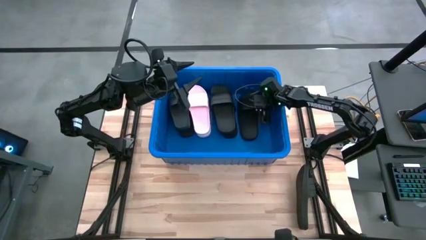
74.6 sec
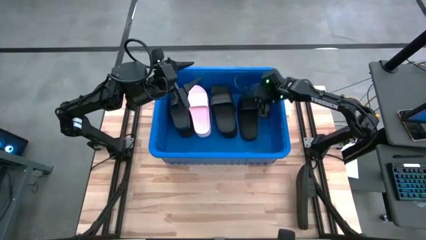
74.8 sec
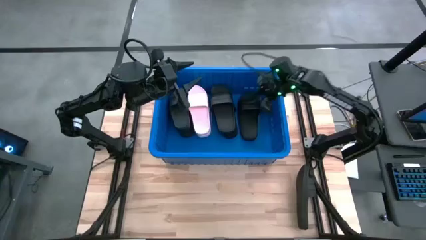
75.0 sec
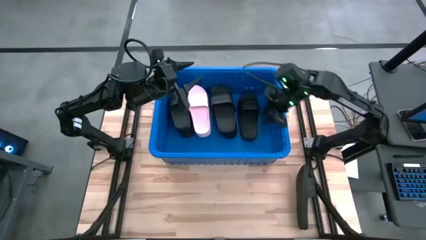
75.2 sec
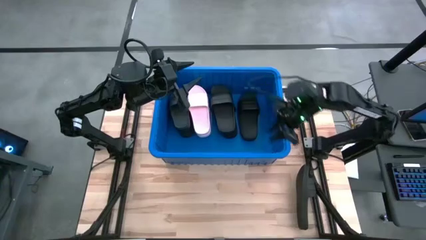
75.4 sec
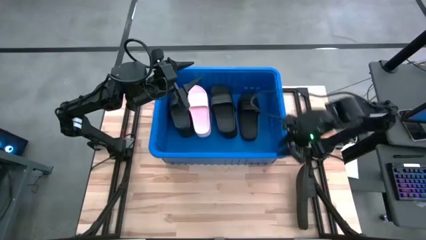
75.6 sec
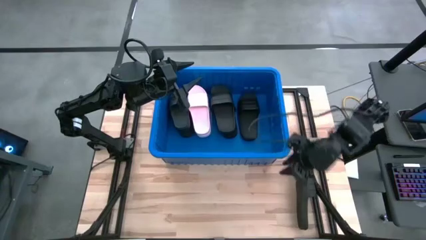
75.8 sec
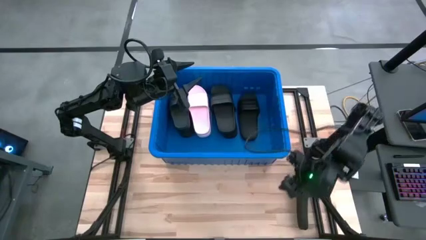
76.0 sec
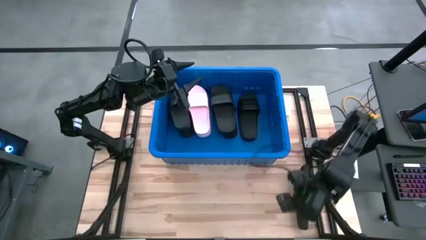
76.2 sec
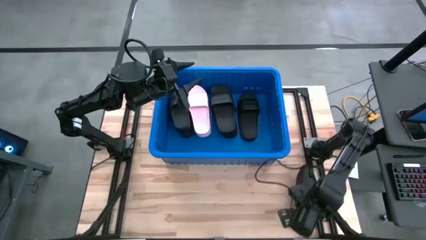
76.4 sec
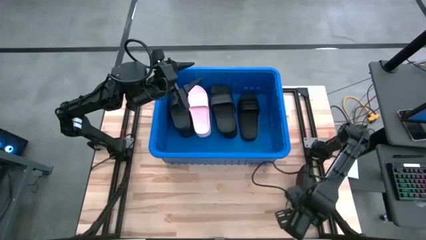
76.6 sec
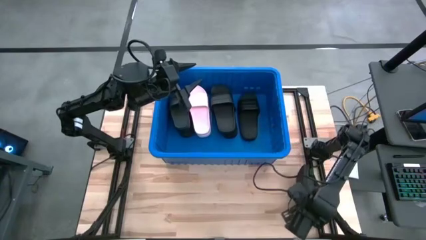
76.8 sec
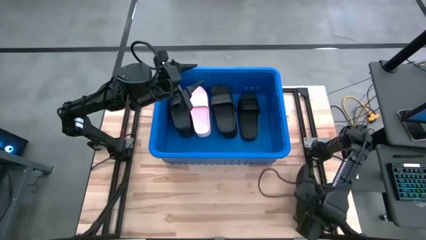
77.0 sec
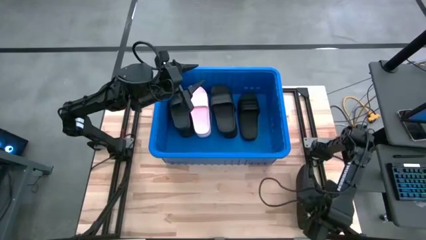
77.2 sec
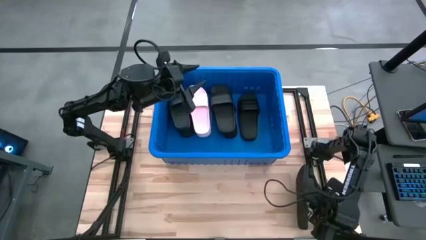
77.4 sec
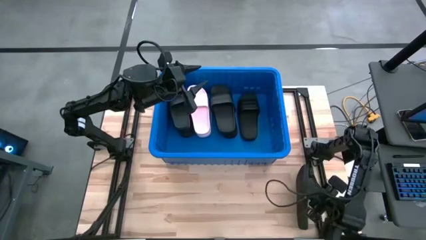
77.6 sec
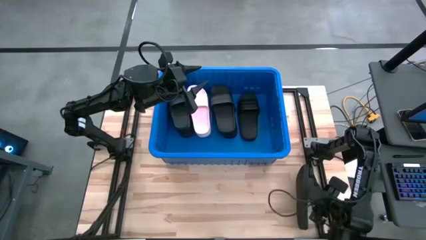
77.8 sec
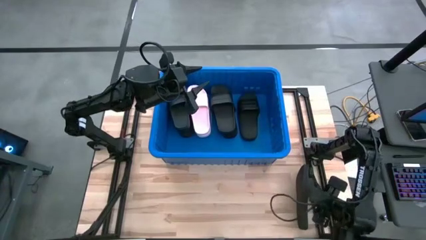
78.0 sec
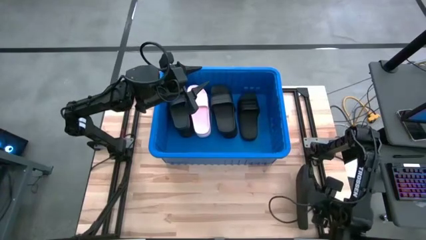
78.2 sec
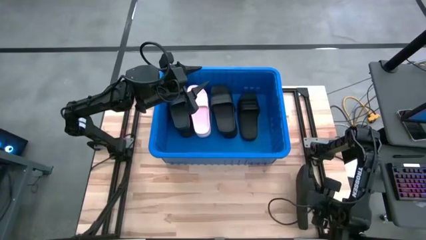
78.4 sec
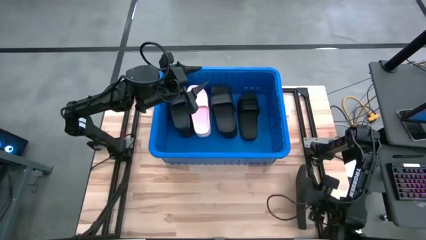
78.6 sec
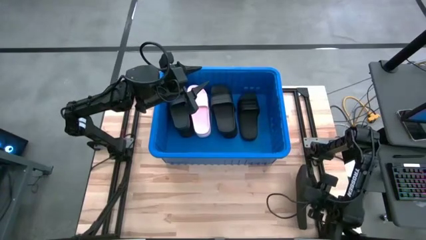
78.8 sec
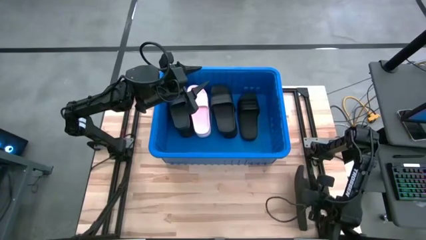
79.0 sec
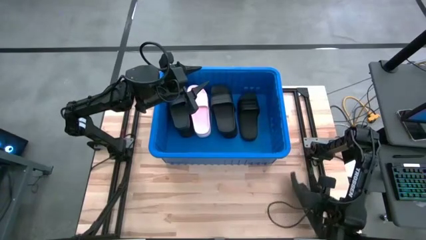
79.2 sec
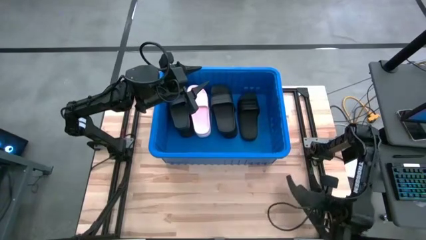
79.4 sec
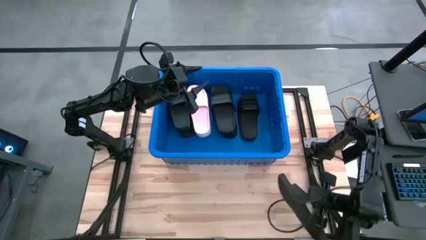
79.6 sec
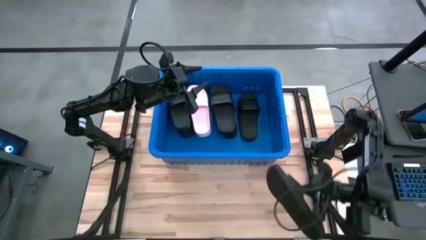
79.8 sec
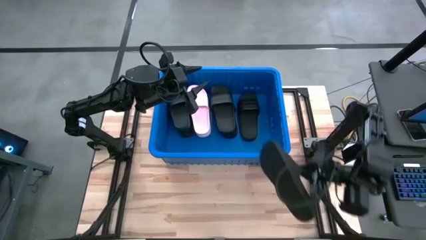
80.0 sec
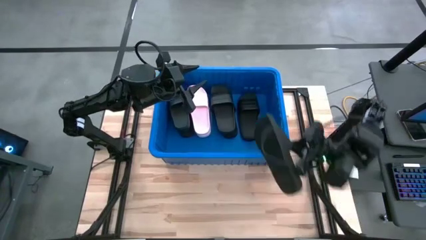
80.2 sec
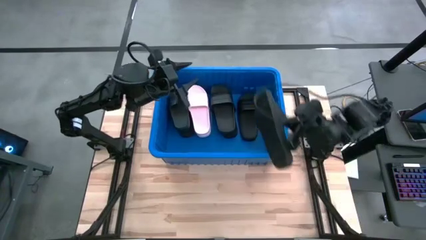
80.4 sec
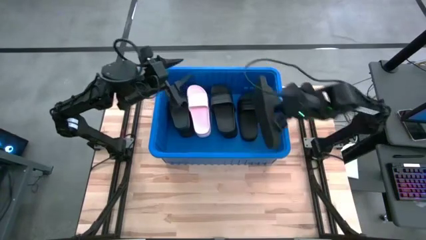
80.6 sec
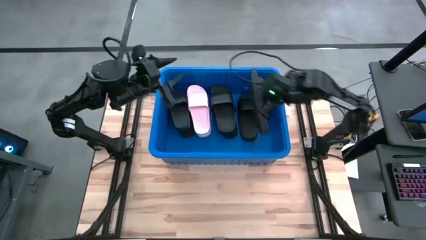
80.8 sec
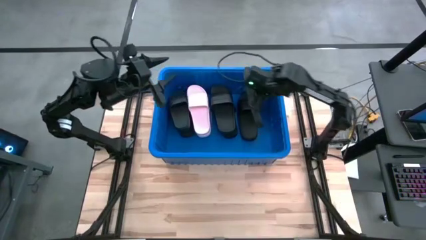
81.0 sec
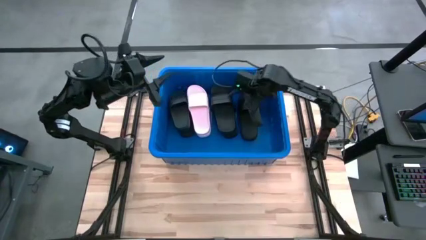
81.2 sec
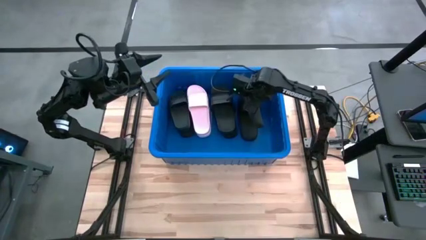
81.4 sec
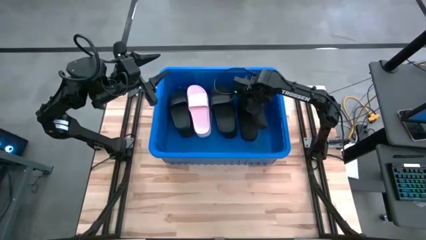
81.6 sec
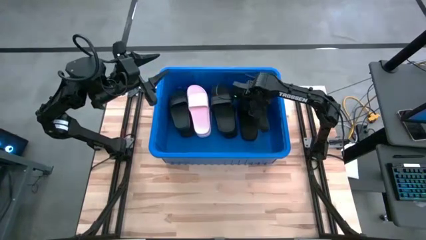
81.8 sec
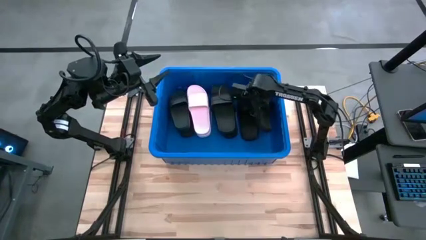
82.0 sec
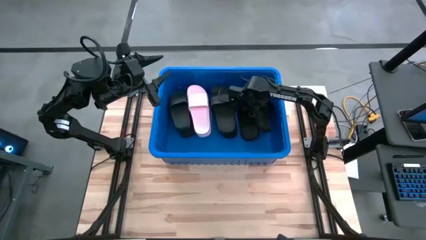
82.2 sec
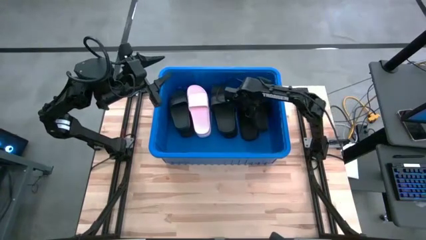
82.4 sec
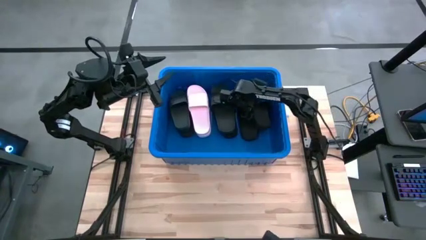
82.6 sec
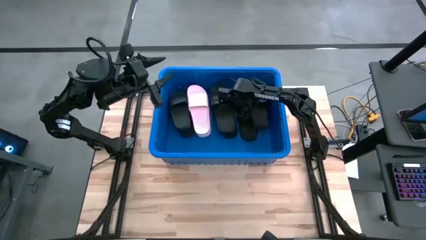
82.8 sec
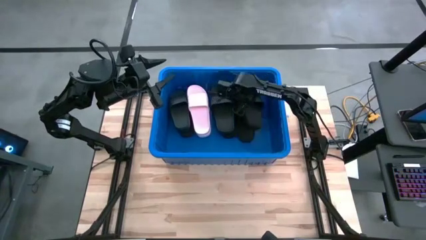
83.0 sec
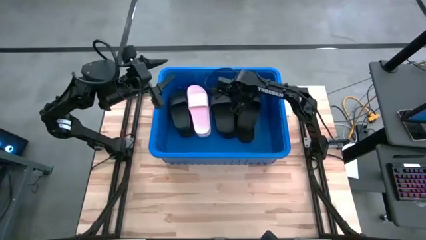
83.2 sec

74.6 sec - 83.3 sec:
Task: Pick and place slides into bin
Put the black slide into the bin

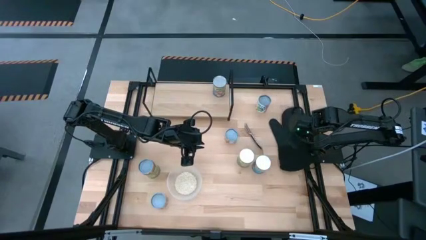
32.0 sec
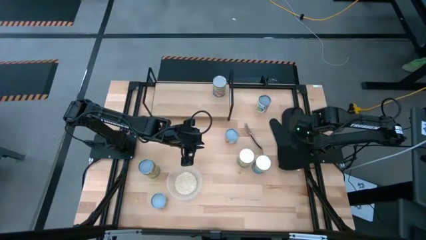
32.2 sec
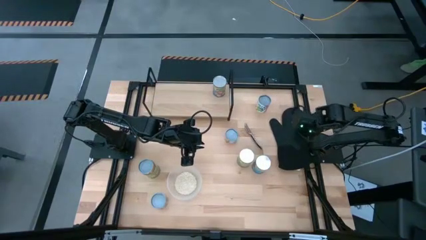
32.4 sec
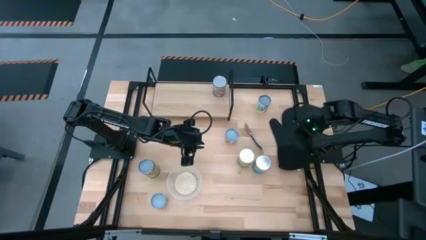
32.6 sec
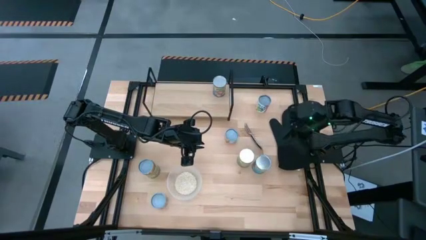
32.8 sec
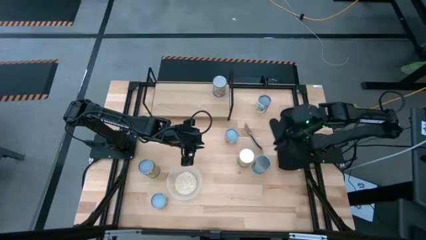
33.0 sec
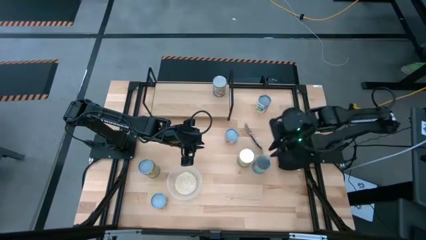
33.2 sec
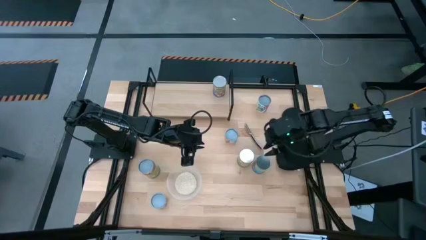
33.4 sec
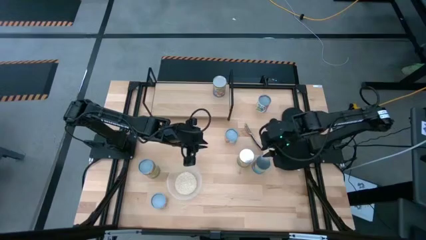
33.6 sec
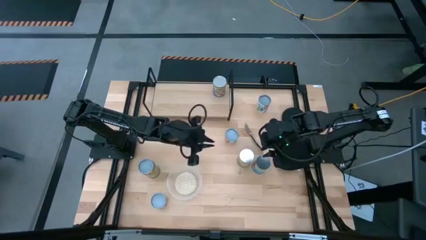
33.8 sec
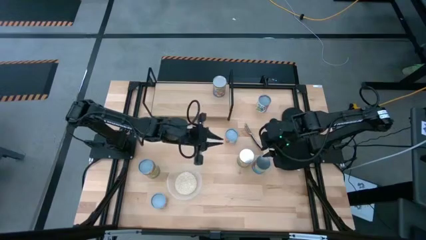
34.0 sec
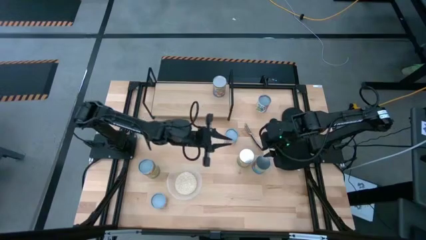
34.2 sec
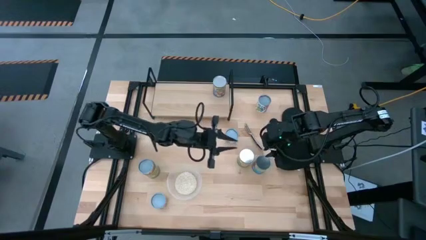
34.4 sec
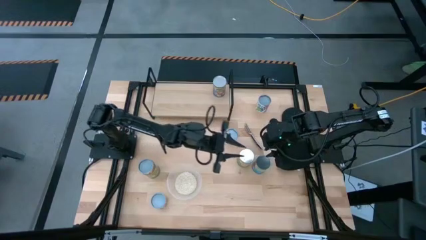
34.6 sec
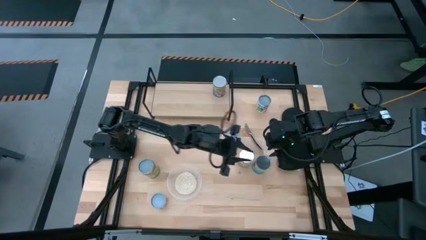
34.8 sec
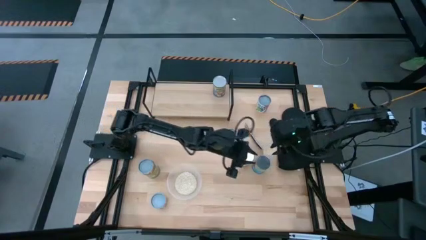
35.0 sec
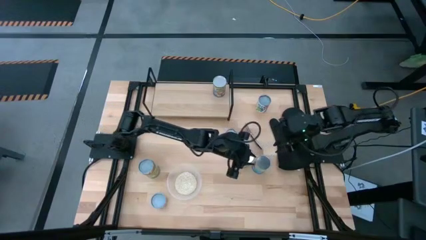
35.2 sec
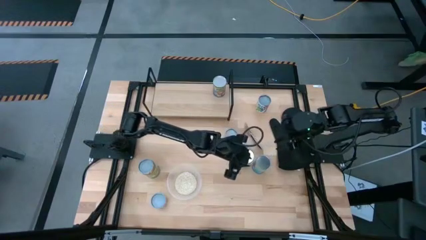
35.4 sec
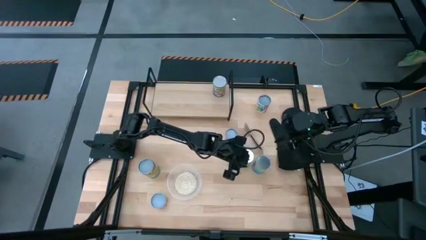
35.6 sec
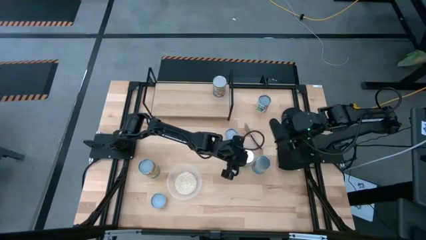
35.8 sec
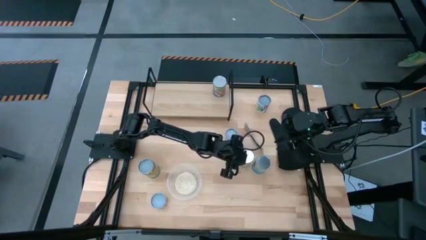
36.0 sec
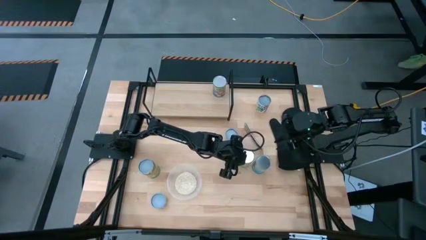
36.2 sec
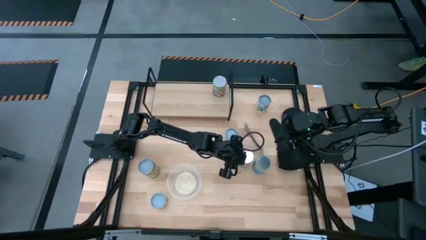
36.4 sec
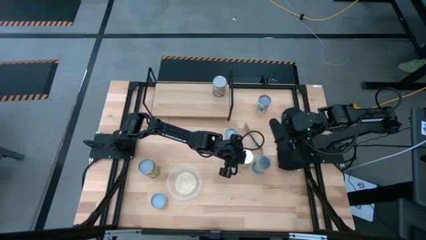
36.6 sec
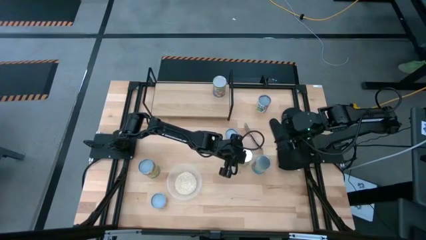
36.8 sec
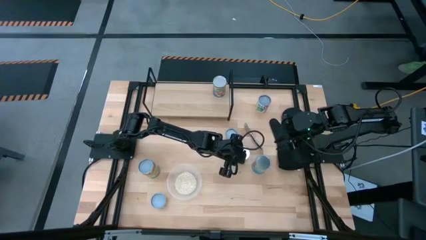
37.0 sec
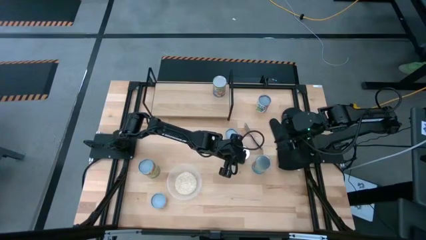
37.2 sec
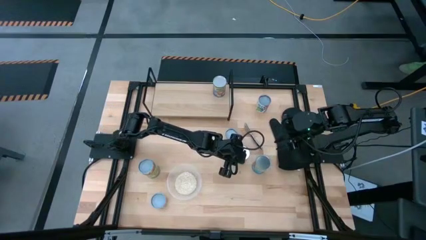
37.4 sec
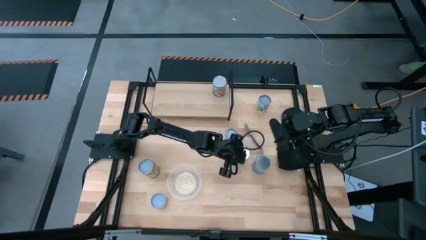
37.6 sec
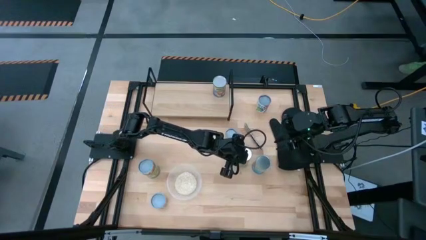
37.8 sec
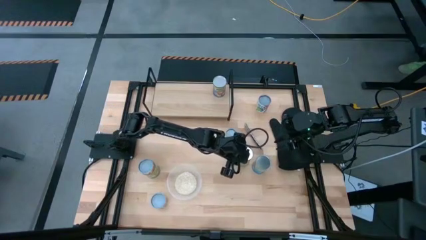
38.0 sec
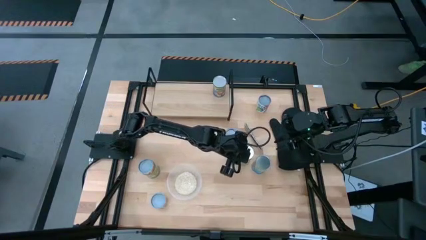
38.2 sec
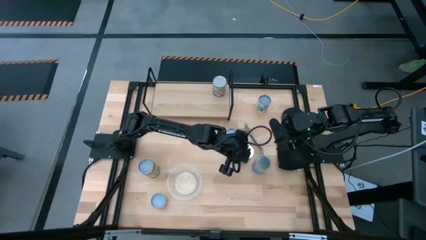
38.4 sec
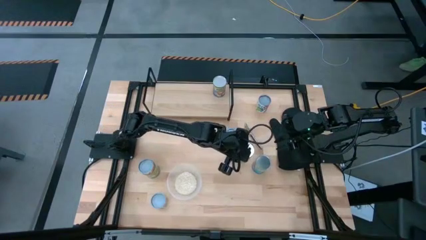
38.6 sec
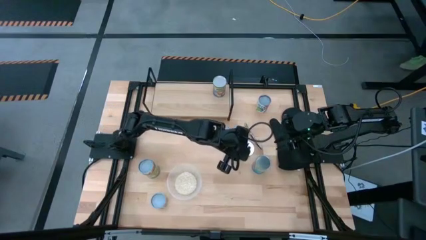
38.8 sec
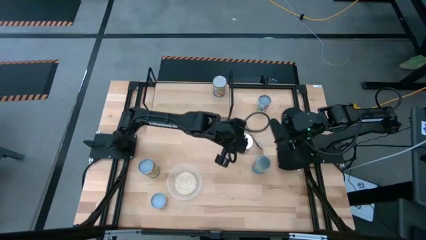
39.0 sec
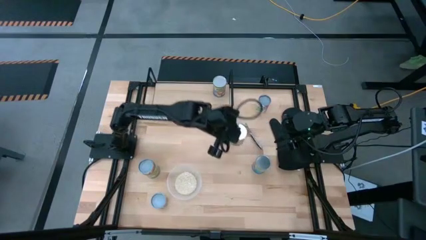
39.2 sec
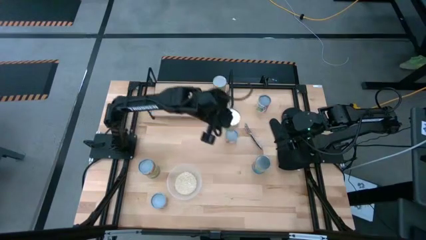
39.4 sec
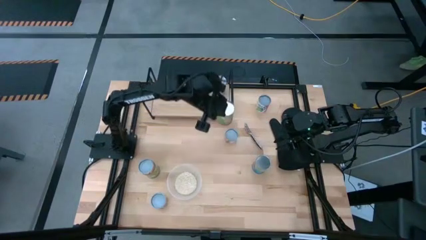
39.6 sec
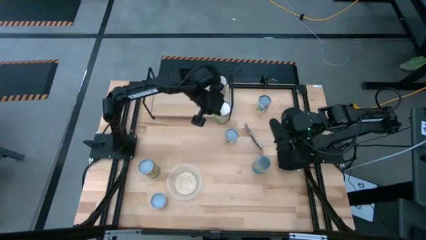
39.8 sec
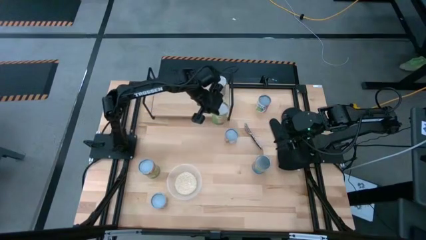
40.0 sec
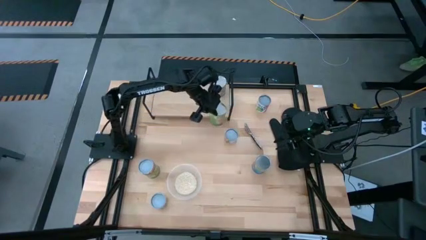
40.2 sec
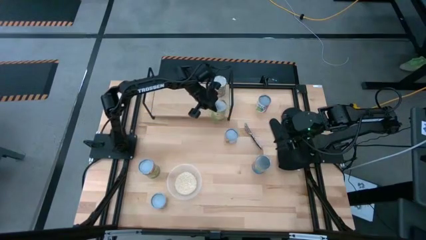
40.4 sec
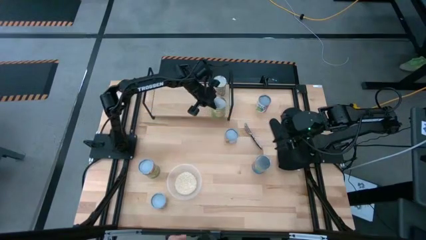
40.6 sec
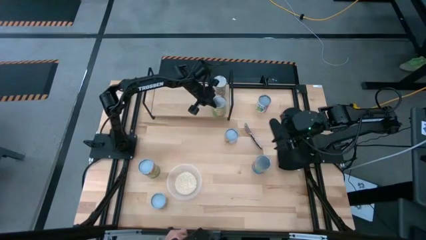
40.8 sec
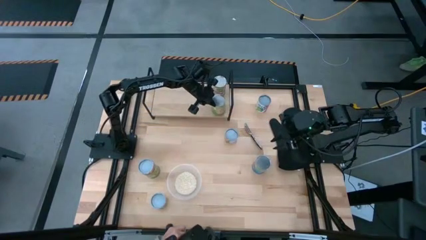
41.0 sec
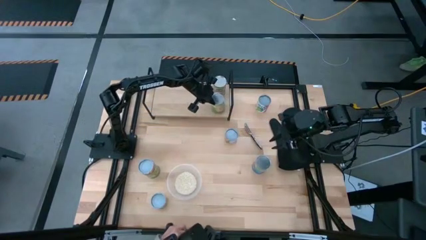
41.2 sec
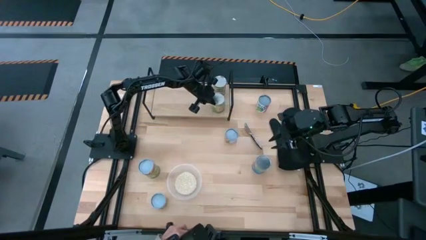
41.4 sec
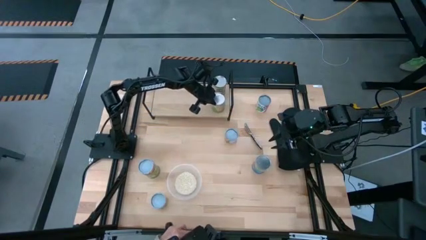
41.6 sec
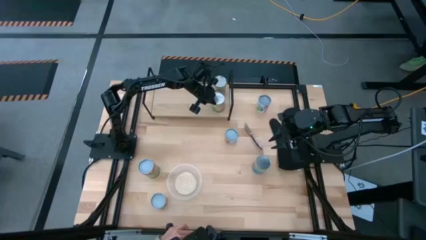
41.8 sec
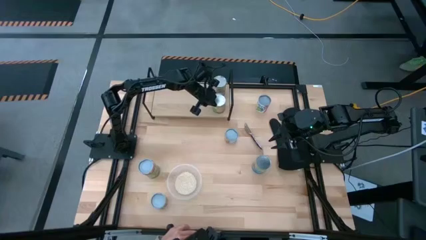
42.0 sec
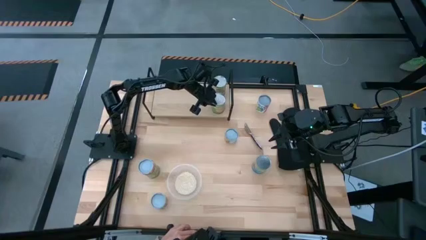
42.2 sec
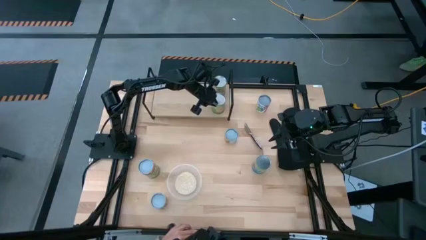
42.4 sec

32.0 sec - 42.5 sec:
Task: Pick and place cans onto a shelf
Put the large canned oranges on the shelf
